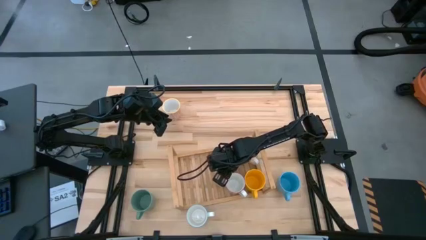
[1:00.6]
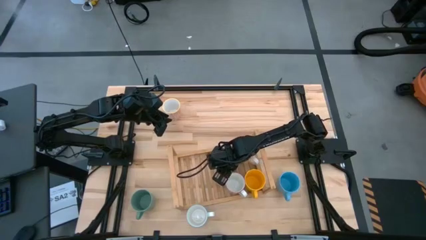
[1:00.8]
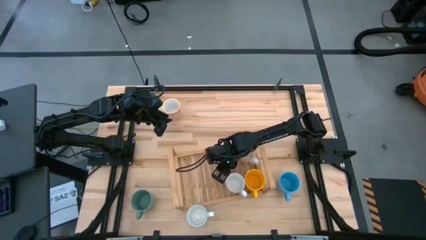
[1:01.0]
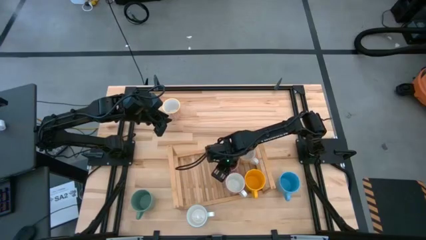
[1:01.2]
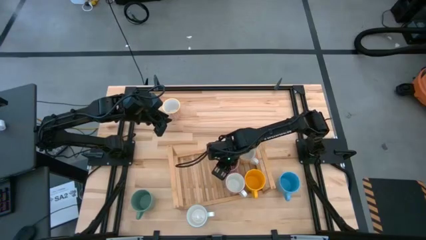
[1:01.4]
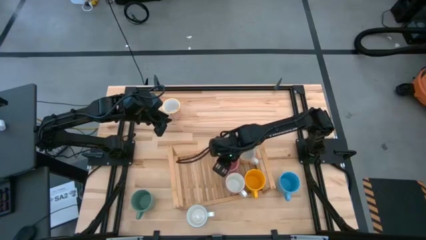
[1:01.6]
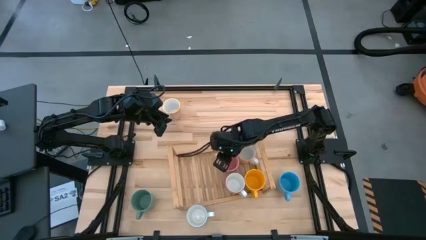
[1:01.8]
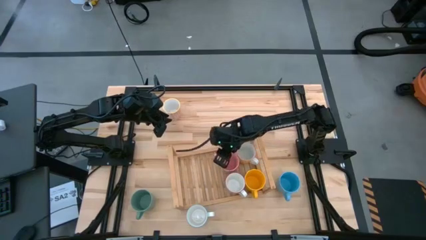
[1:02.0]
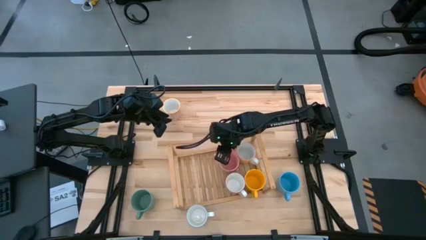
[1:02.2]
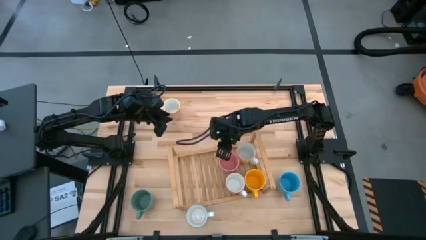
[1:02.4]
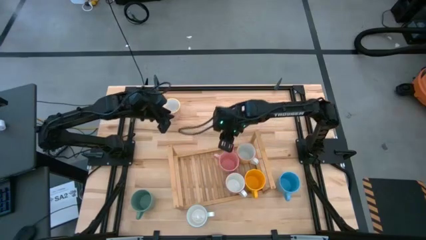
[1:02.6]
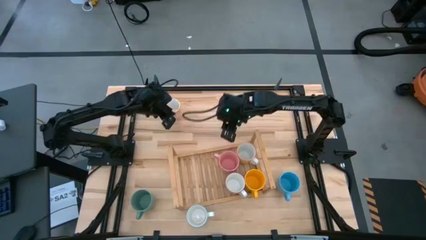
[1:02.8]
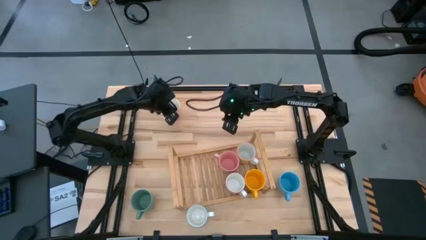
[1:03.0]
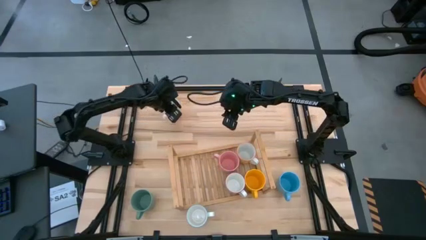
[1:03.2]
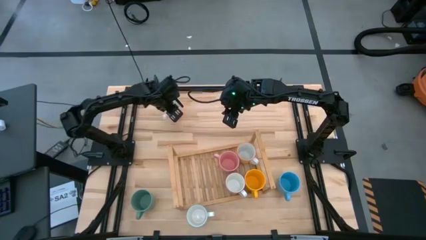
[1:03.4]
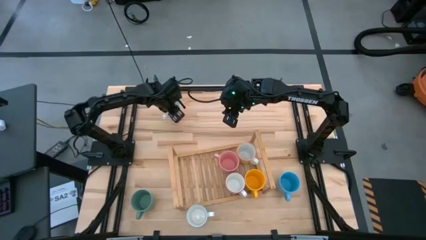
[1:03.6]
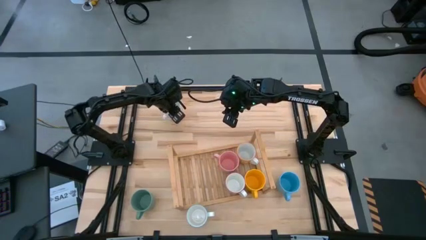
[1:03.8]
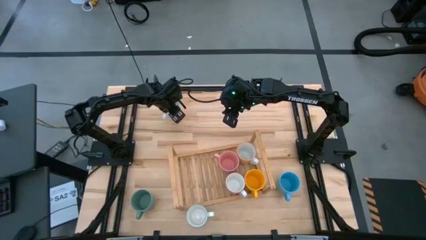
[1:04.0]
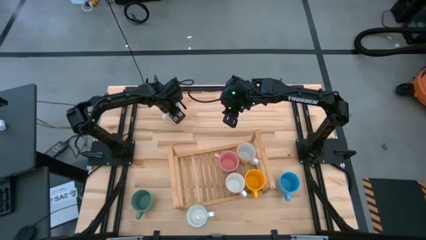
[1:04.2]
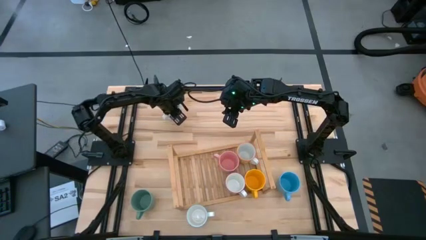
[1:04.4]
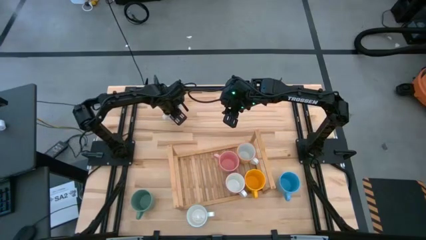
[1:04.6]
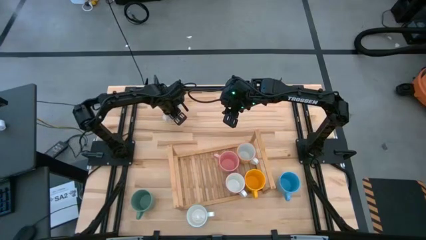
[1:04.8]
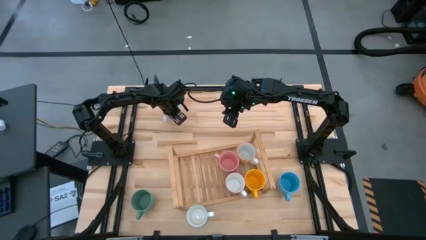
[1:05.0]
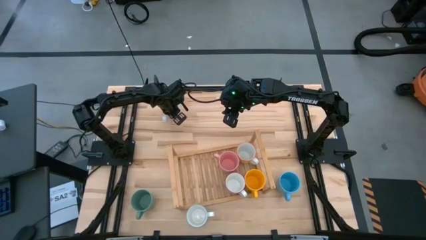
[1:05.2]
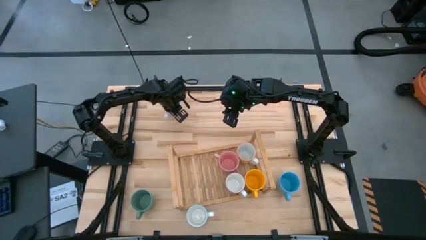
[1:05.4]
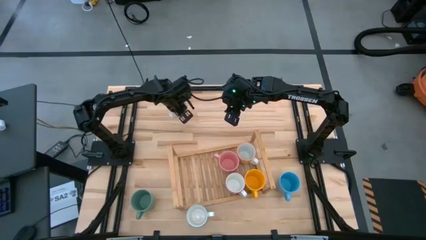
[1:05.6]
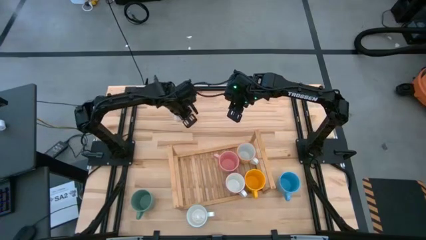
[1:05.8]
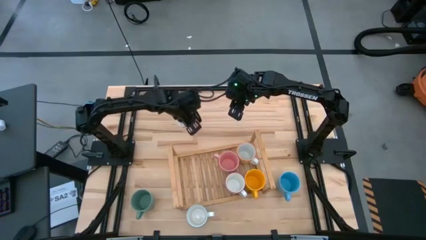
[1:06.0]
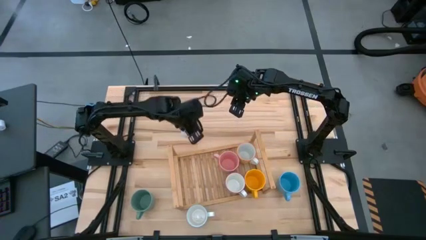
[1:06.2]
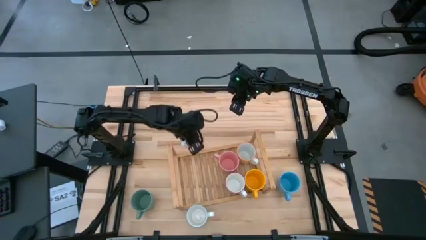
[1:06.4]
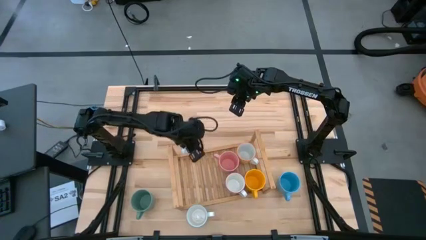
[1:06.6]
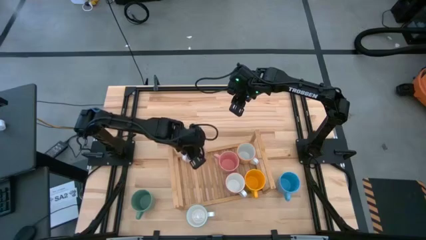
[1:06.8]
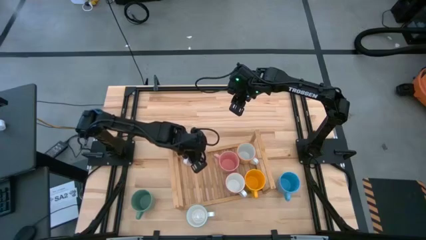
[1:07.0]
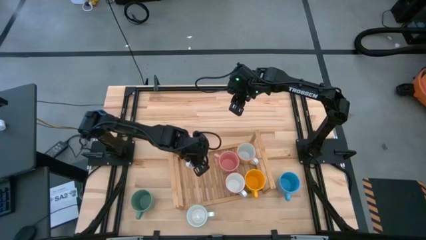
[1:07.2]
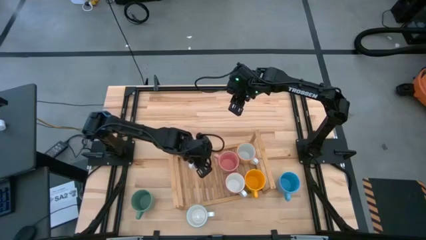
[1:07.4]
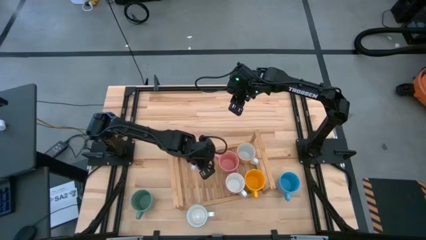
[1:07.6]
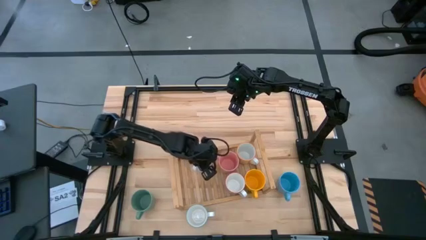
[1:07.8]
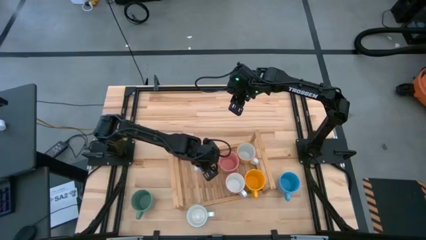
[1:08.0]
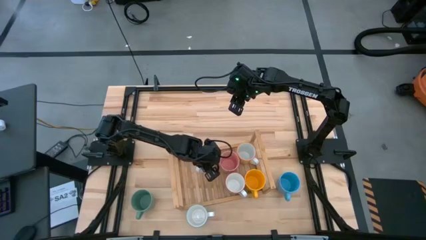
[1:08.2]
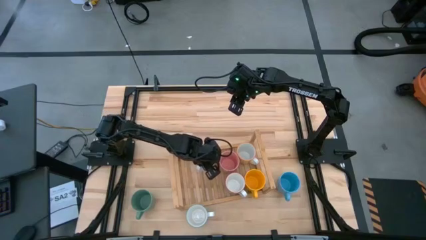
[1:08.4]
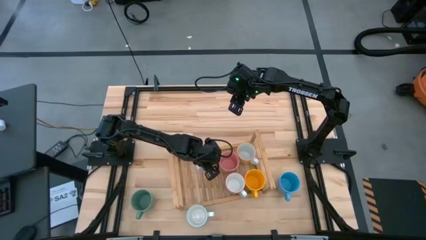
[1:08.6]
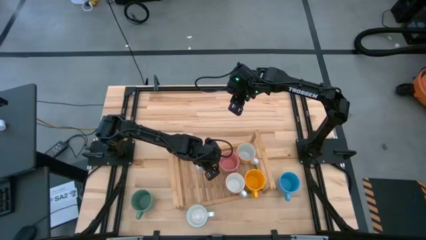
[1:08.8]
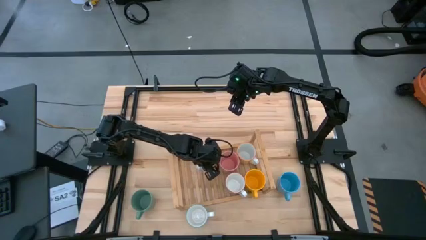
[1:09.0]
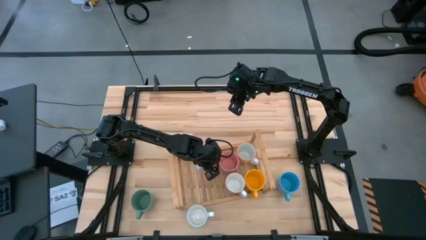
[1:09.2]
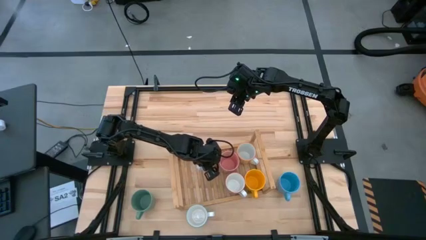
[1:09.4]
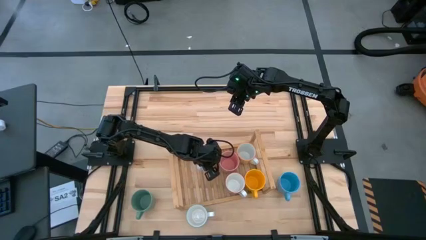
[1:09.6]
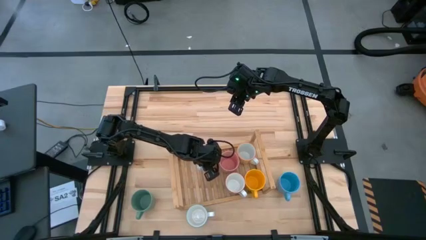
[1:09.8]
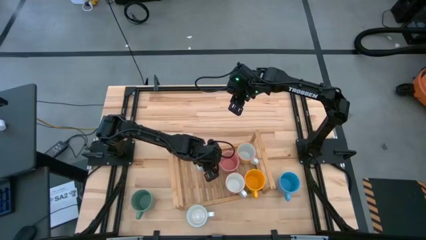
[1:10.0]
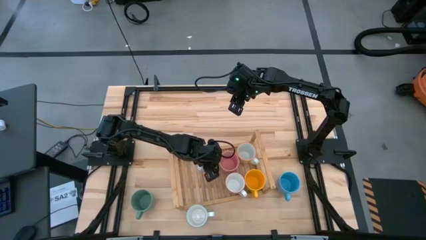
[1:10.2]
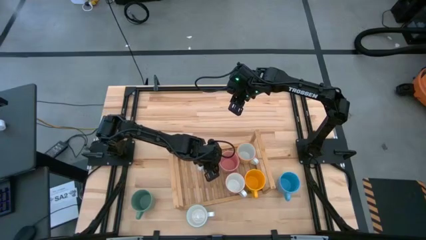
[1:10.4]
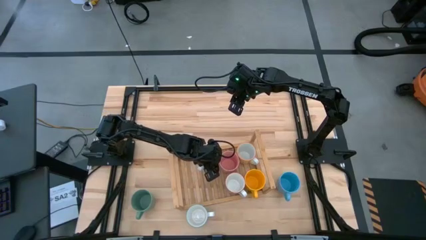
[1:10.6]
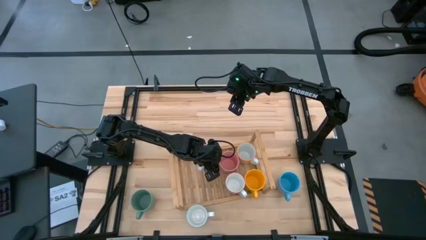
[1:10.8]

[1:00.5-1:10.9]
Task: Place coffee mugs
Put the white-orange patterned mug on the shelf

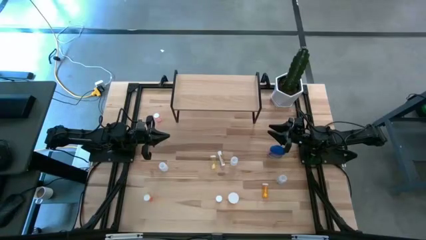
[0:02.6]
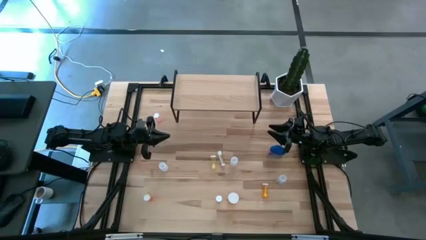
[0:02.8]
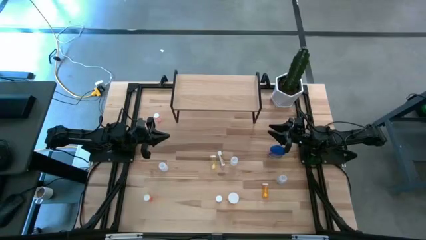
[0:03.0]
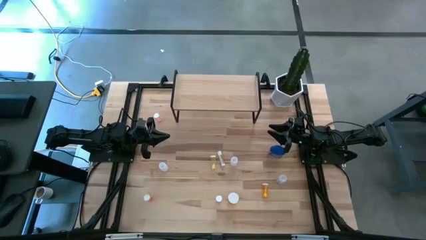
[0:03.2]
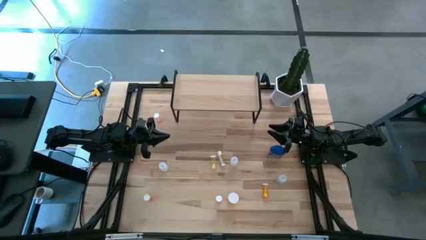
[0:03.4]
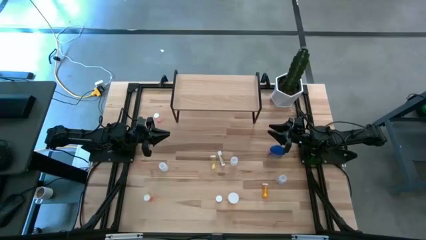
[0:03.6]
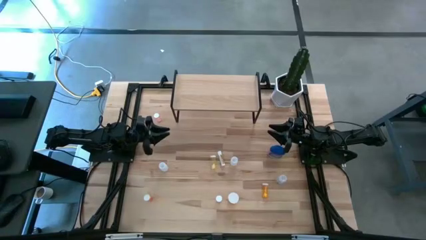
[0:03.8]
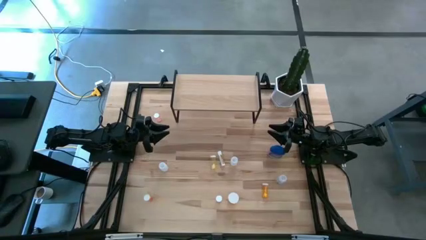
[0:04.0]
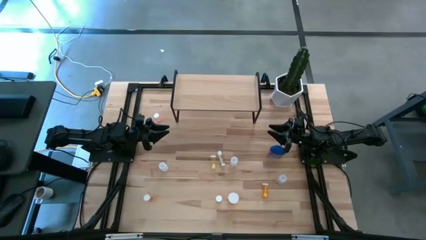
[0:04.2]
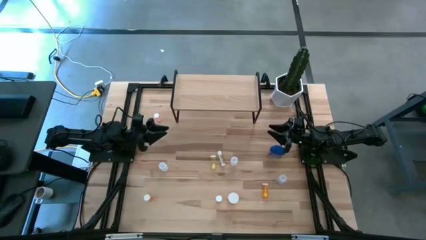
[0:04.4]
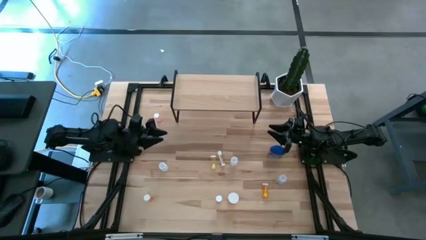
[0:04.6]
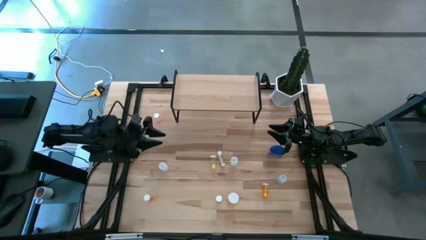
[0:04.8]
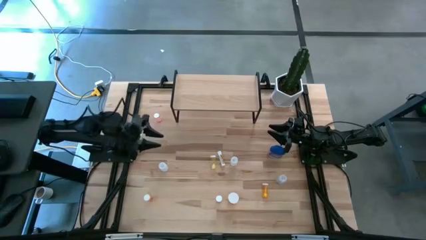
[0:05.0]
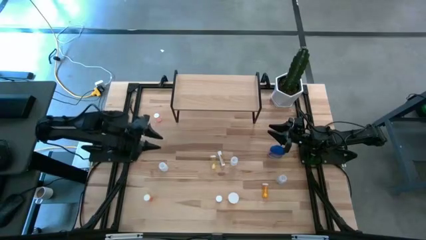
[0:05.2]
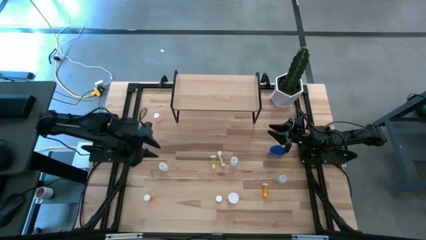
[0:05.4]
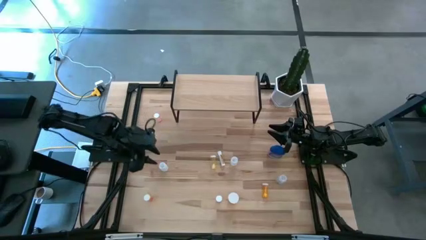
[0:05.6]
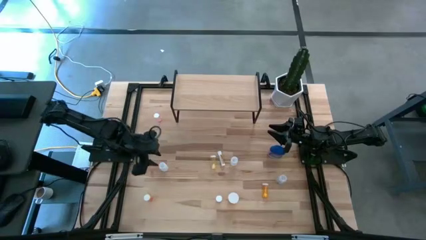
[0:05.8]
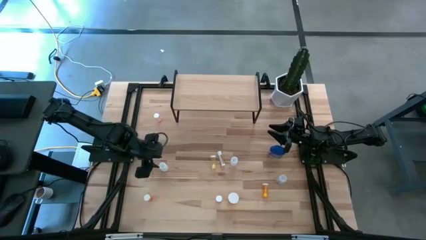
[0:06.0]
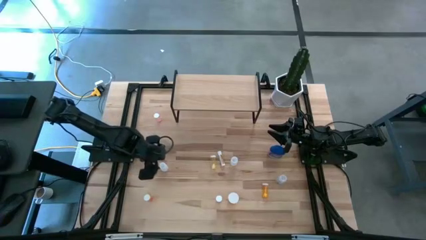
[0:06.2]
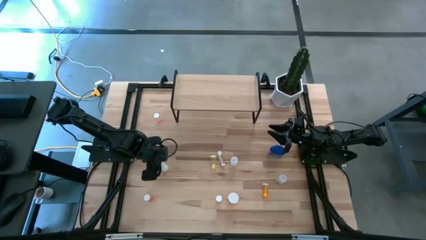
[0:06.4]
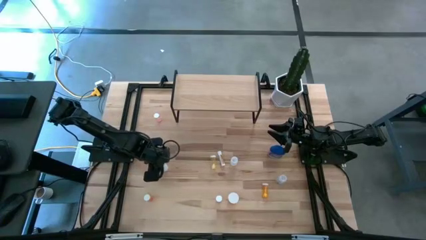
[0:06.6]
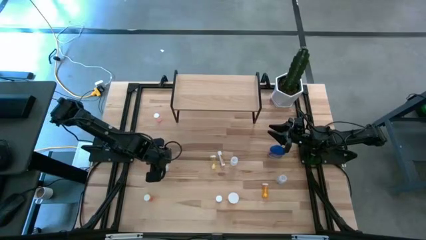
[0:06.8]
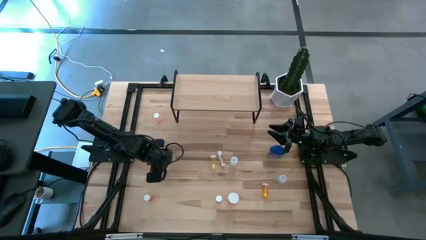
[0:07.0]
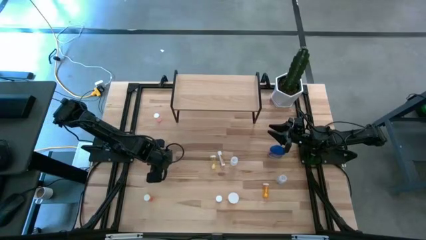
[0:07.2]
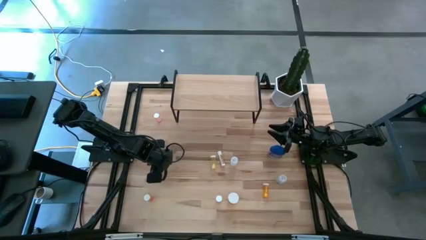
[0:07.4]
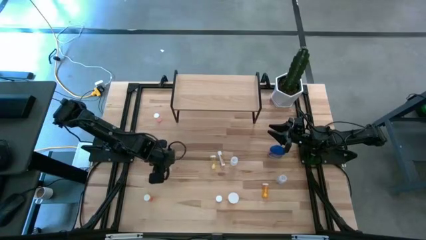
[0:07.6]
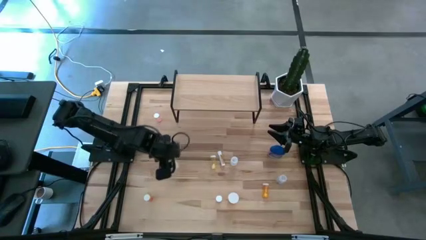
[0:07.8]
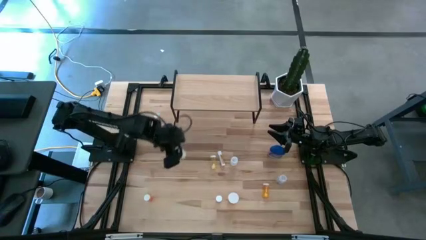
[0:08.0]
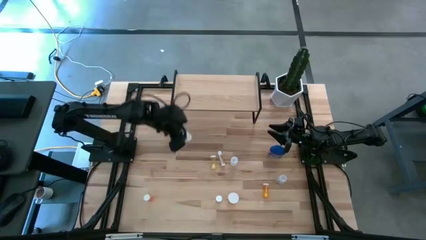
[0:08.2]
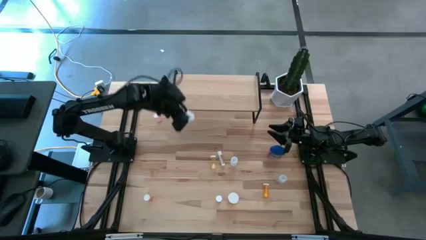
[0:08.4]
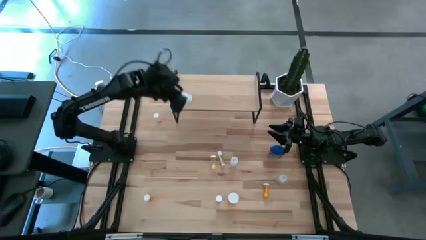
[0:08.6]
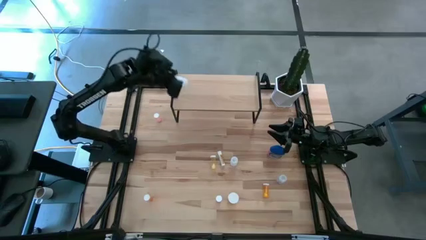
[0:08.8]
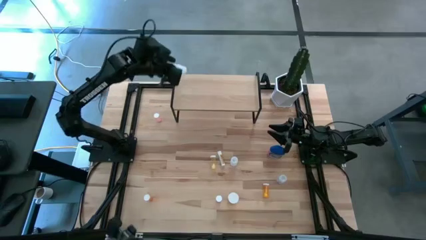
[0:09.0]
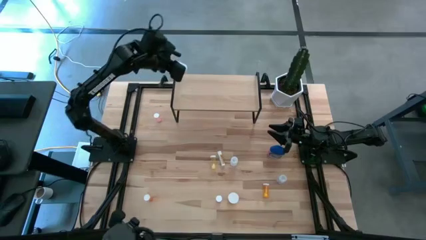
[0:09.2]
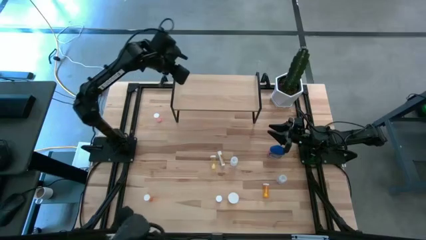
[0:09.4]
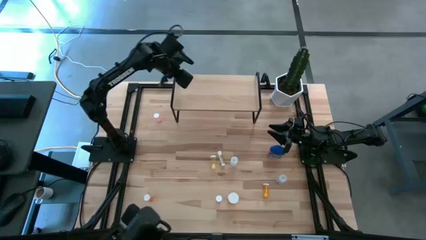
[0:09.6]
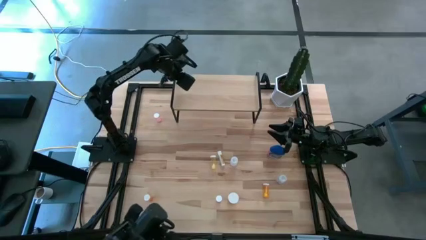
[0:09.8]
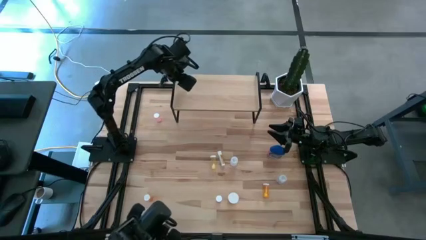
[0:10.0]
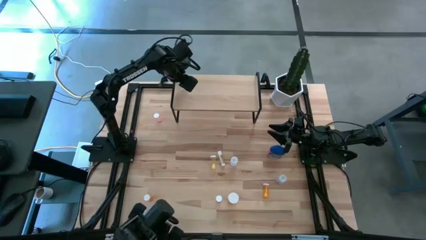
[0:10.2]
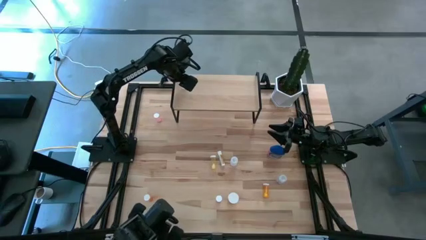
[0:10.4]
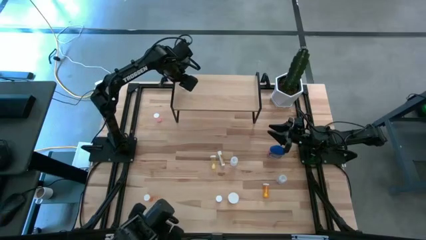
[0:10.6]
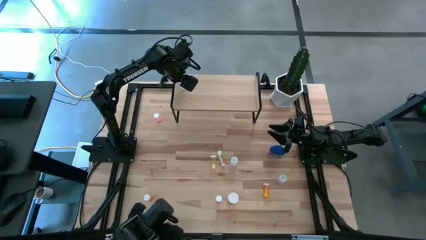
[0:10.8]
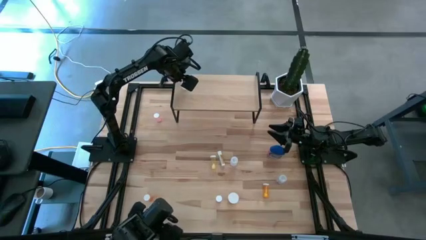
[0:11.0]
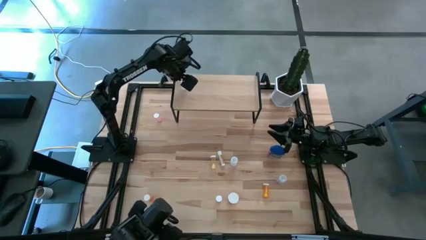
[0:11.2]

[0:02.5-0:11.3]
Task: Pick and place medicine bottles onto shelf by color
Put the left white pill bottle on the shelf
